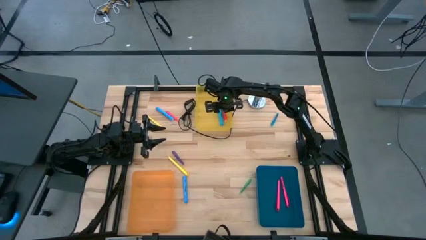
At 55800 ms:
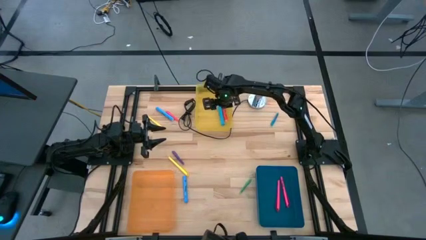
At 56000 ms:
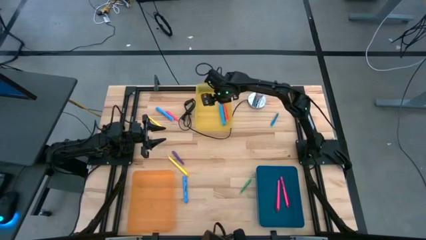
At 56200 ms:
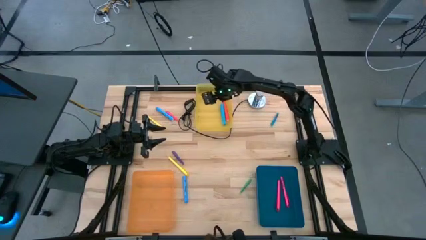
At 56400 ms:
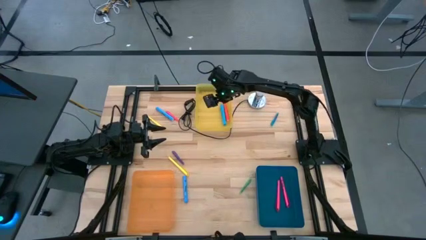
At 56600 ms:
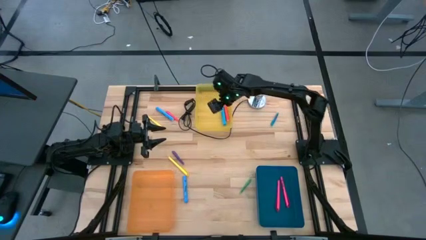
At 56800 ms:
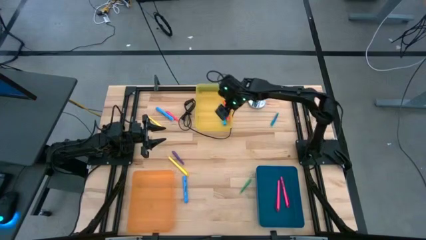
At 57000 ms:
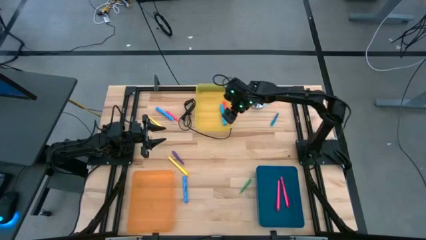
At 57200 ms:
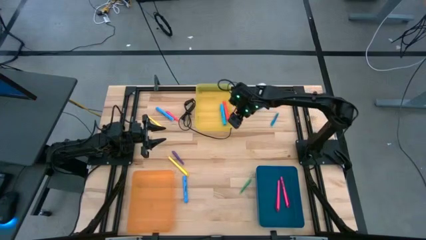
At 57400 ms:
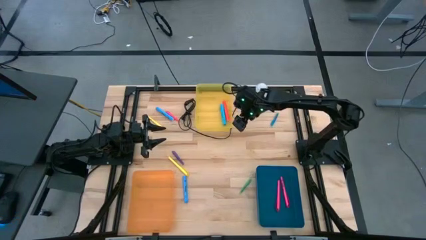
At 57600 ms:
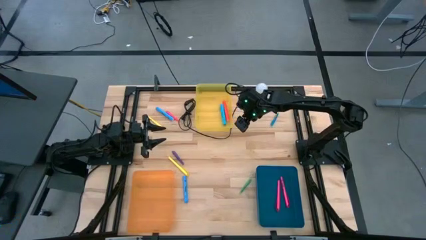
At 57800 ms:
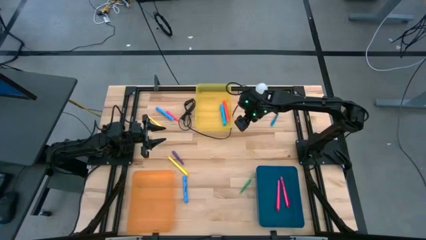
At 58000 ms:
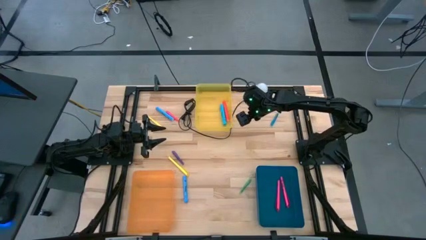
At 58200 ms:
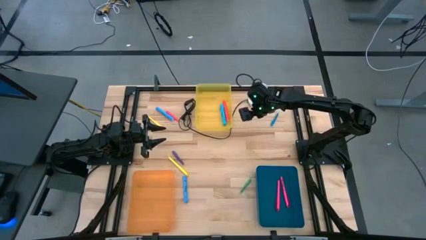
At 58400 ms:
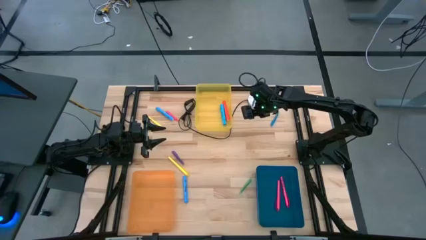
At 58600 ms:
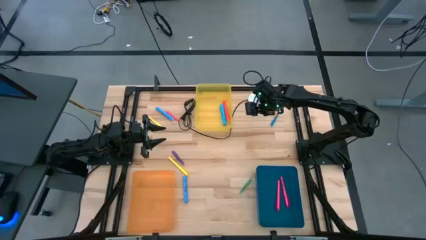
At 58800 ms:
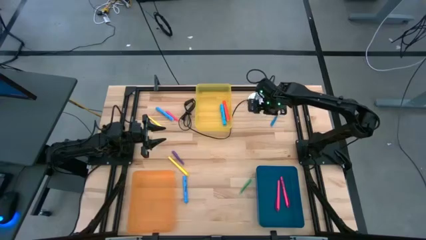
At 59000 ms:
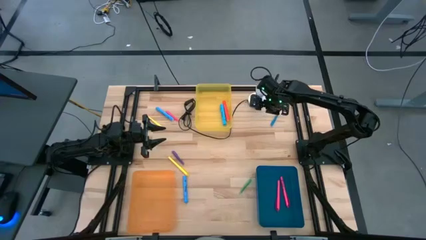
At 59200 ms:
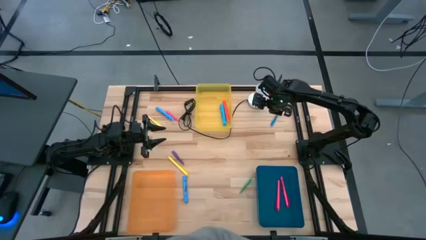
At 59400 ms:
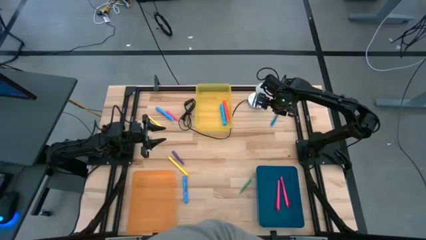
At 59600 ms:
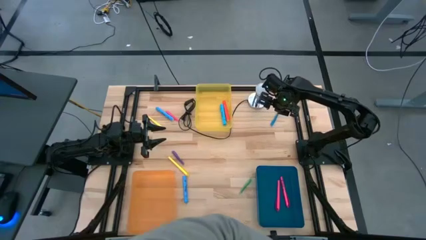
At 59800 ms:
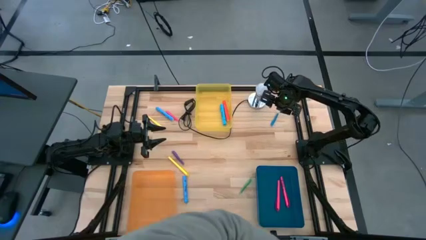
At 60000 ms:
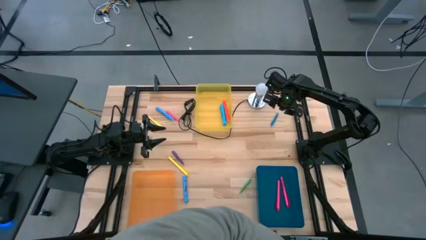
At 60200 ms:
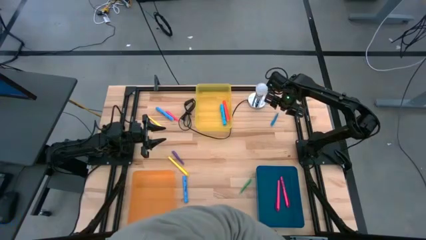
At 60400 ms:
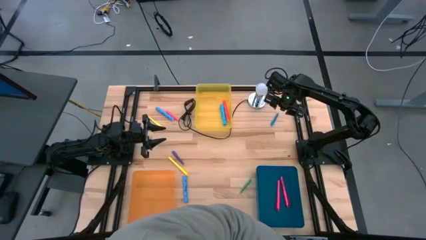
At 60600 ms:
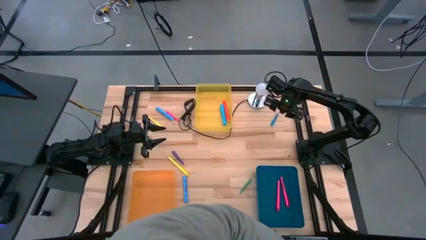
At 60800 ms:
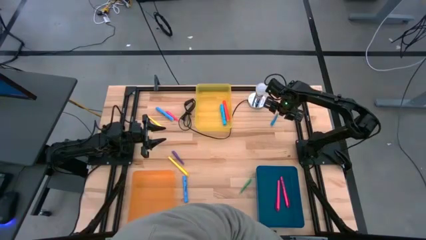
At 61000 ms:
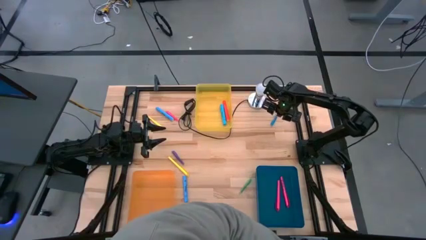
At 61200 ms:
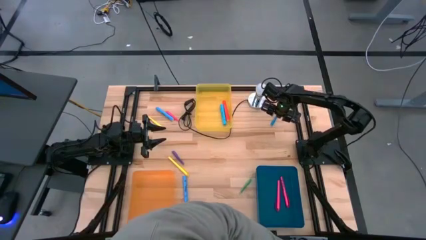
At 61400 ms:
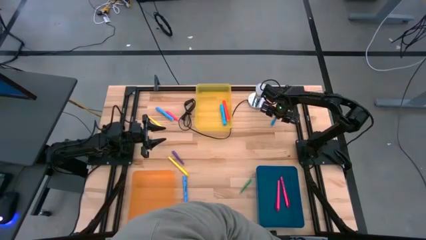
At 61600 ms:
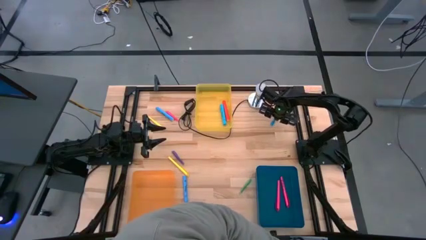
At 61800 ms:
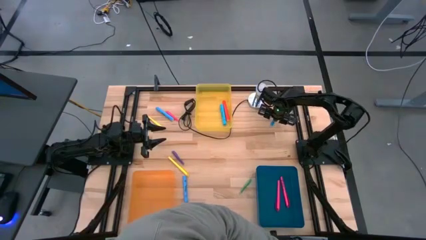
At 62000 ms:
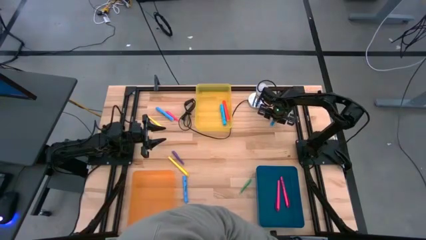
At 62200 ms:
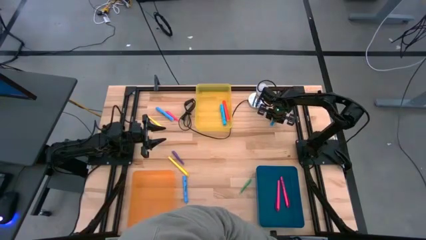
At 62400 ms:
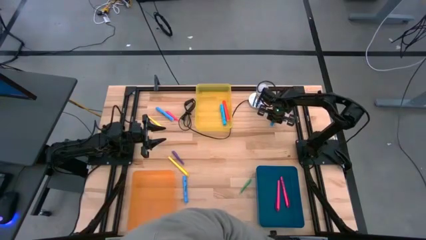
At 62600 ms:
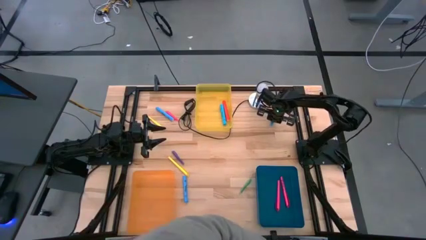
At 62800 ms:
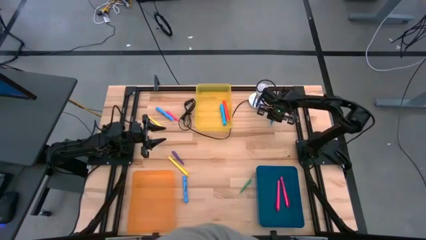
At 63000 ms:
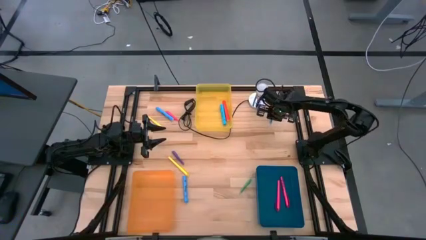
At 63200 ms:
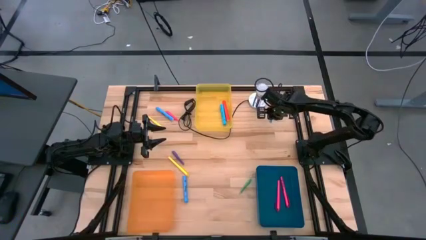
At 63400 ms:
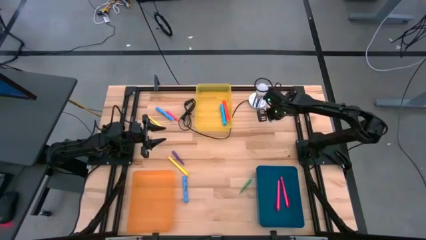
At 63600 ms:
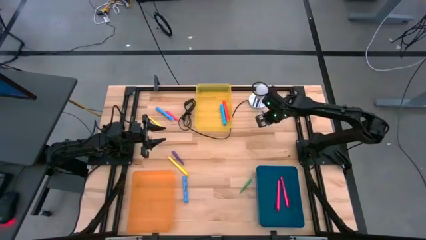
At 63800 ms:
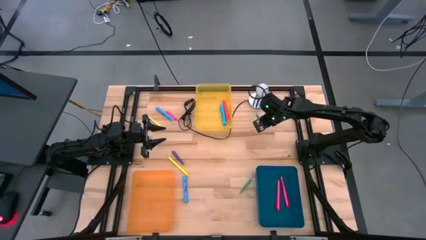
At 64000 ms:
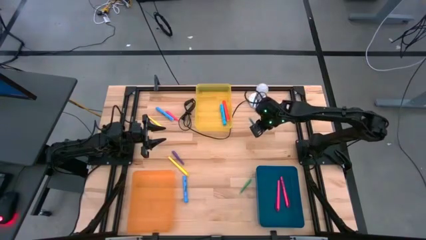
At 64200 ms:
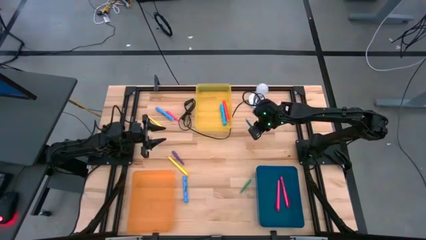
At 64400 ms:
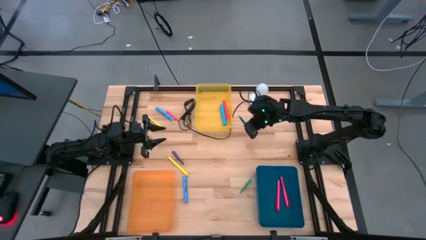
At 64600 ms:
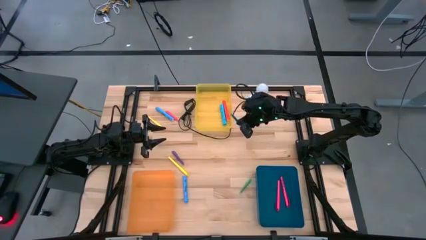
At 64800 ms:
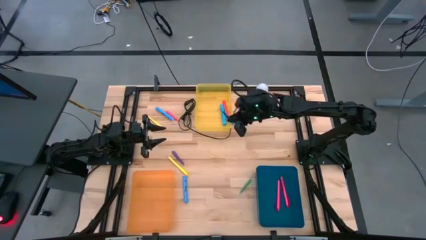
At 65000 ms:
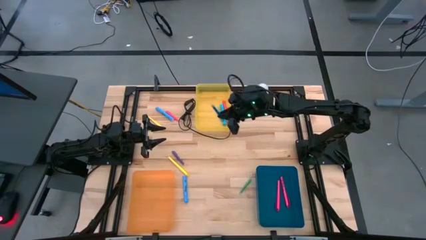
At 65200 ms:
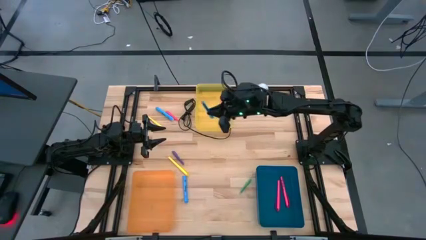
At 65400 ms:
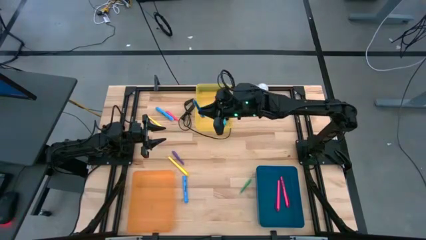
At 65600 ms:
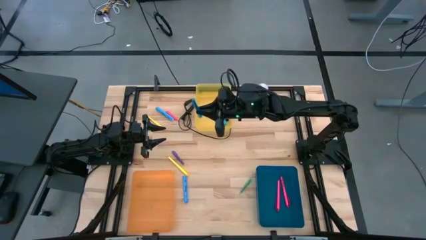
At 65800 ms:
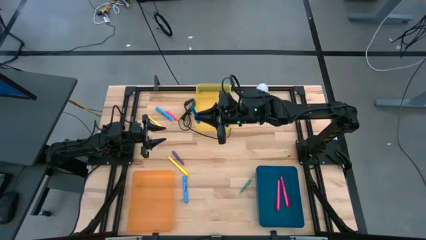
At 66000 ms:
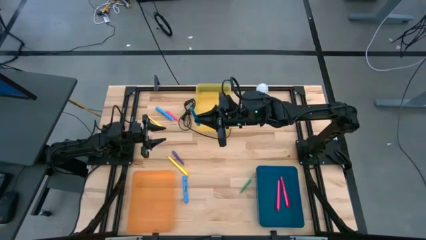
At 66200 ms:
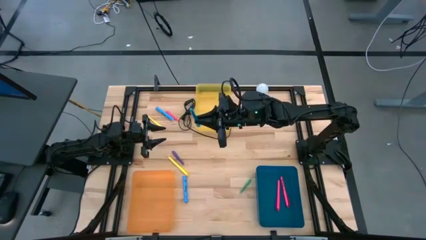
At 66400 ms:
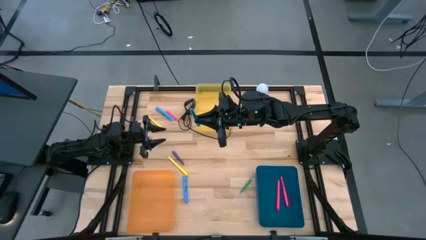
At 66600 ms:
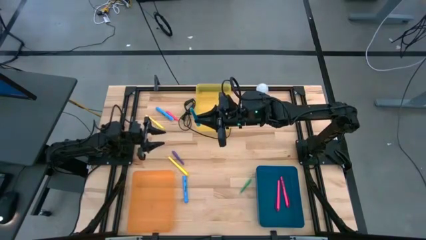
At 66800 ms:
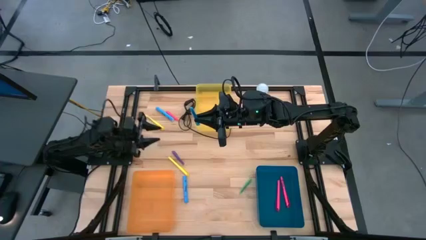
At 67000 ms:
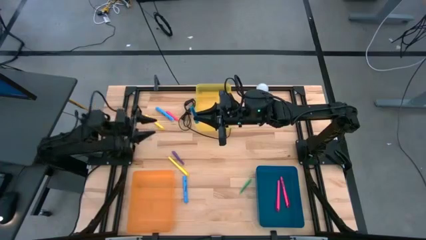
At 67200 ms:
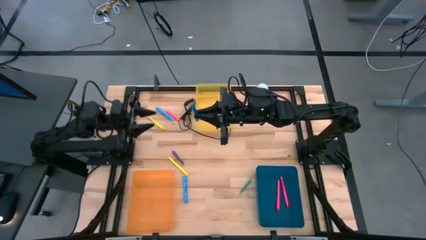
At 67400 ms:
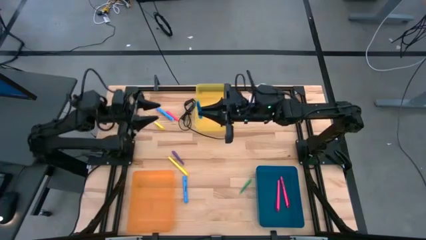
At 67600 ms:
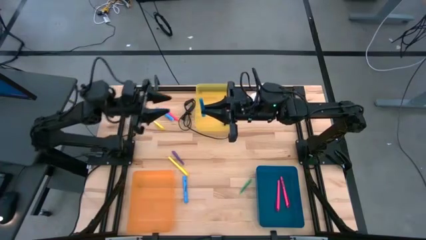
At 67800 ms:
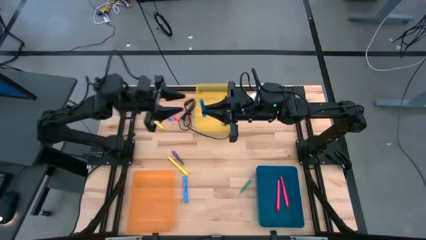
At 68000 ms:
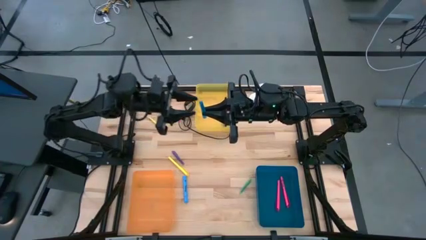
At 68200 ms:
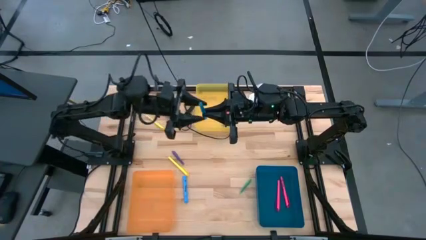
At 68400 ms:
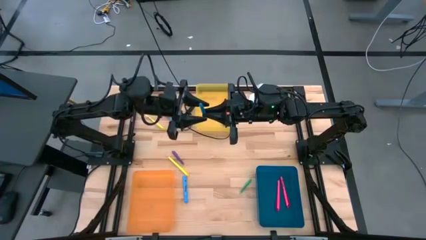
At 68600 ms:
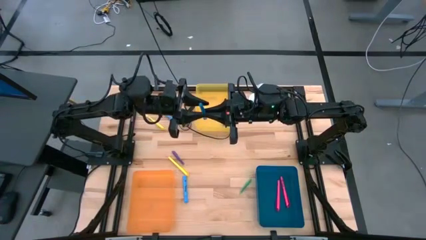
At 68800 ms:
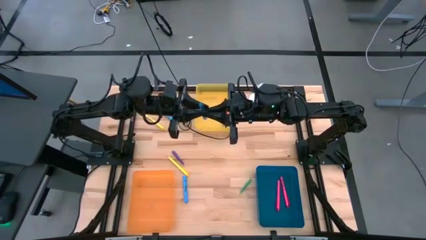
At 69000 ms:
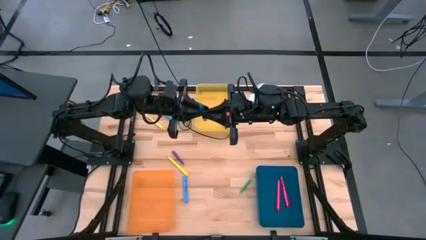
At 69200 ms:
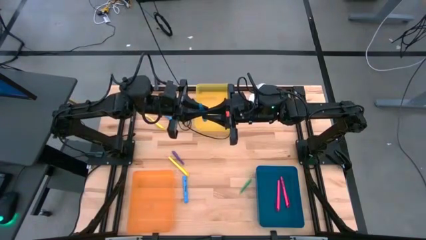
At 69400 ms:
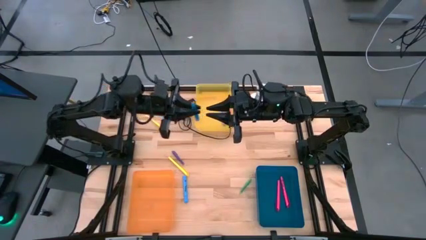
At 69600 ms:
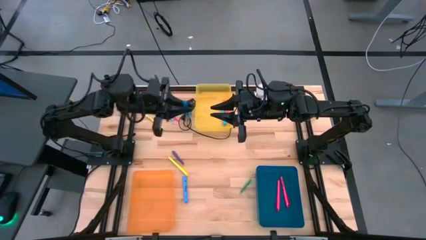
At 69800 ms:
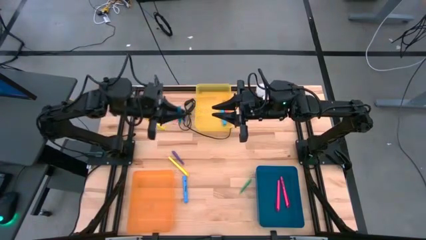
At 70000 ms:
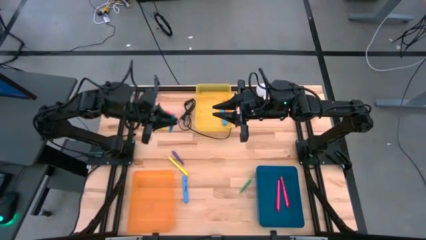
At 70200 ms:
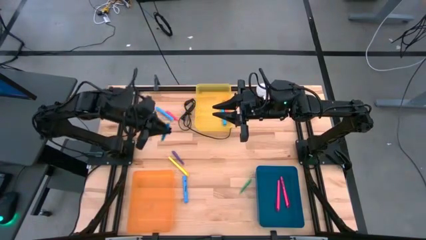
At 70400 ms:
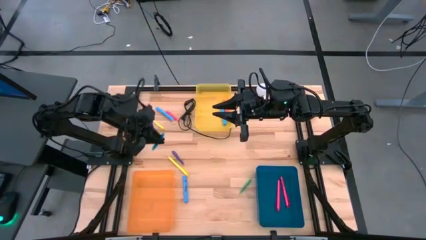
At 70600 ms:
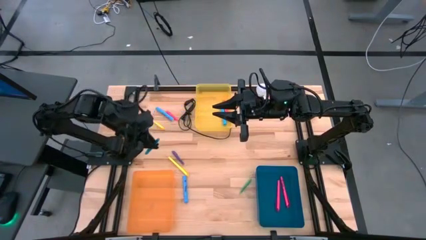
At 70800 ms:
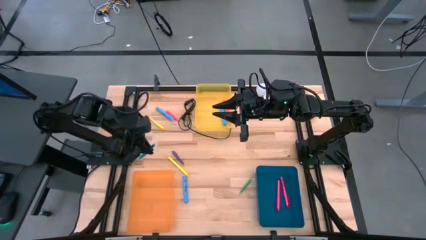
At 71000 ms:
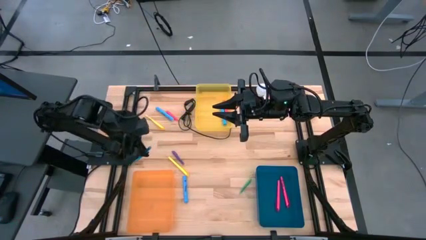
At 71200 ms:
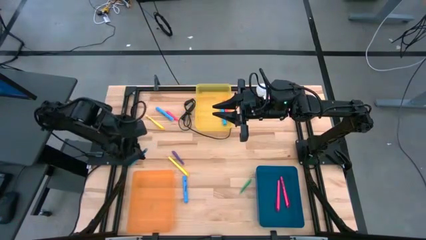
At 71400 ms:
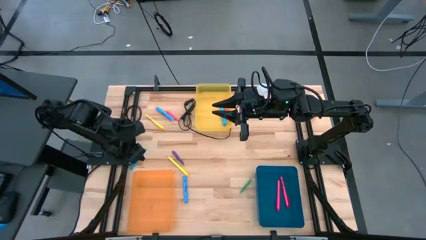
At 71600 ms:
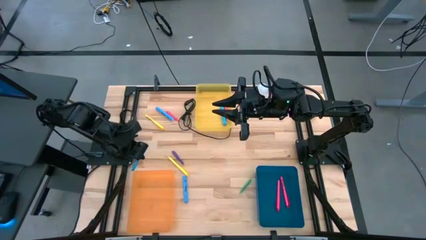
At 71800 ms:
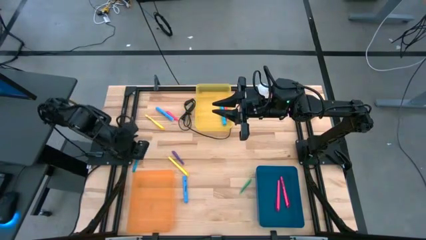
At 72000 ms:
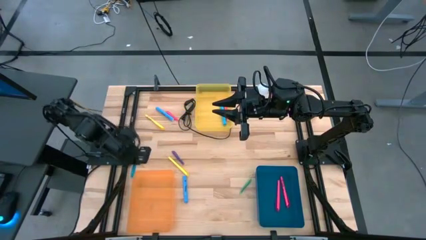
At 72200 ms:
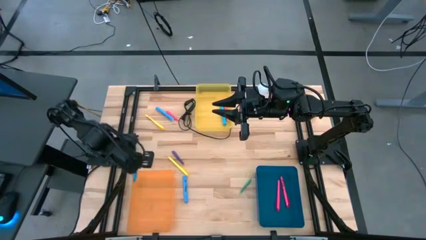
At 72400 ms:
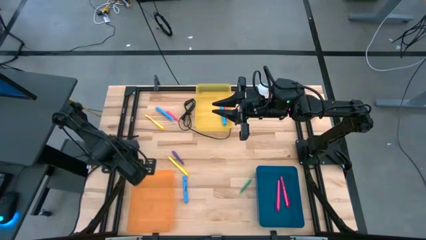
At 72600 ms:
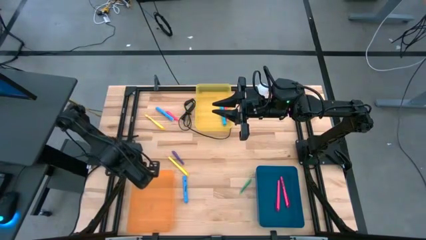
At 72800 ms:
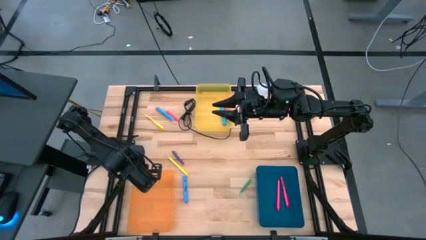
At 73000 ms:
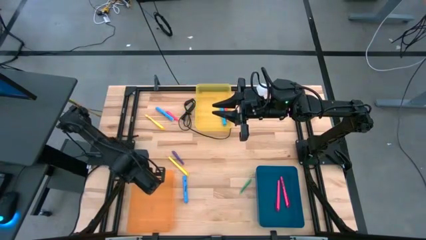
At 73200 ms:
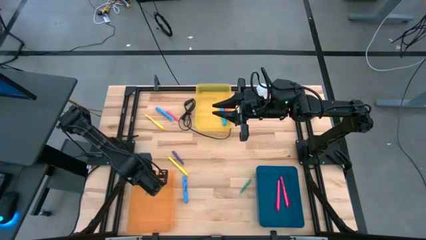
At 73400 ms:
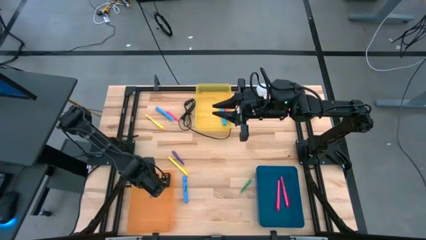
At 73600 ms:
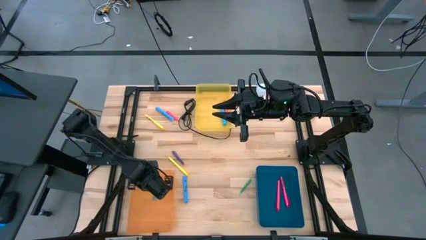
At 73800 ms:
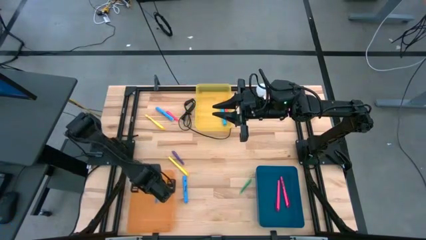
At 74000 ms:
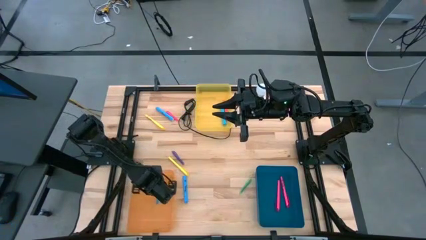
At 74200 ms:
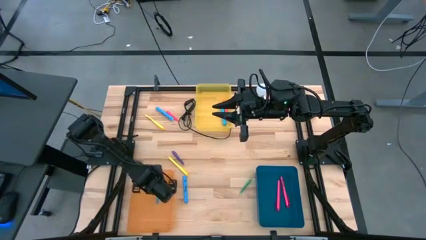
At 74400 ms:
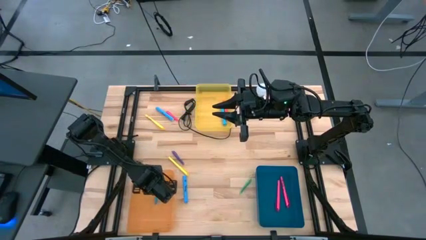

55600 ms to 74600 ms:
Task: Pick & Place Markers
Put the blue pen into the orange bin
